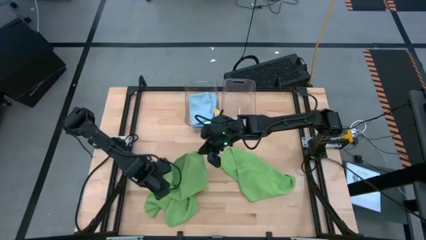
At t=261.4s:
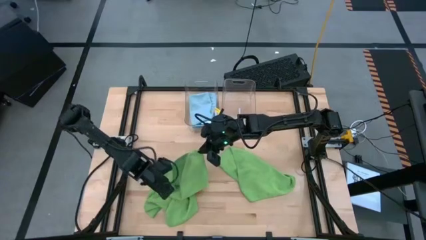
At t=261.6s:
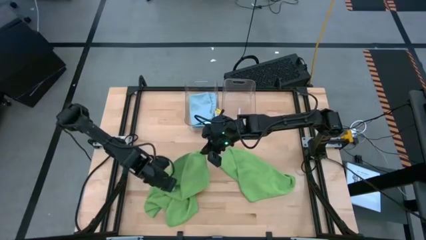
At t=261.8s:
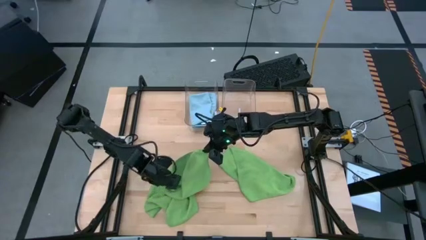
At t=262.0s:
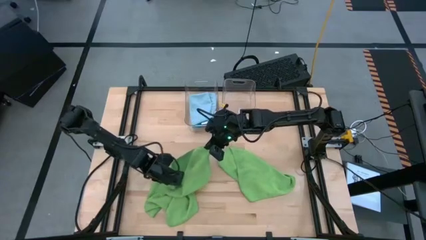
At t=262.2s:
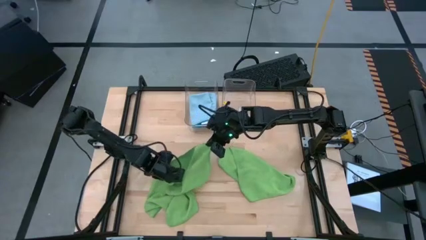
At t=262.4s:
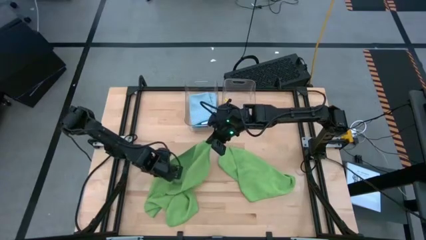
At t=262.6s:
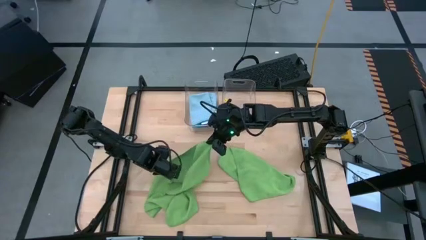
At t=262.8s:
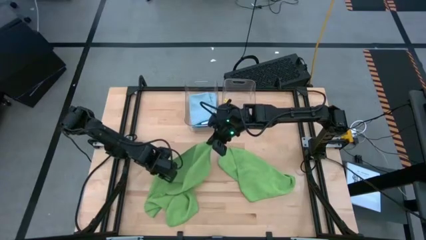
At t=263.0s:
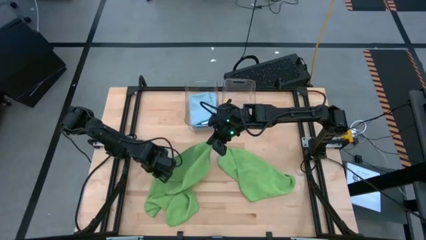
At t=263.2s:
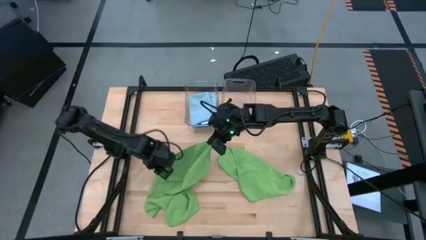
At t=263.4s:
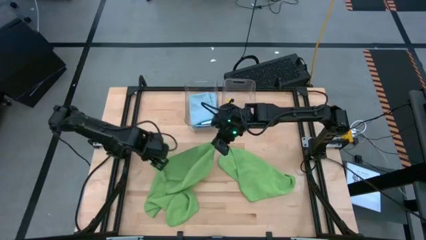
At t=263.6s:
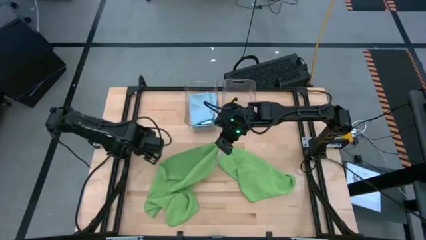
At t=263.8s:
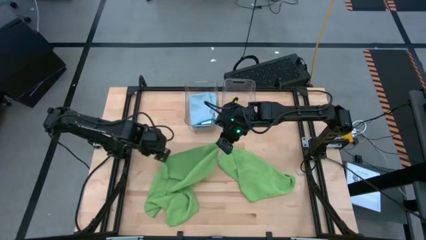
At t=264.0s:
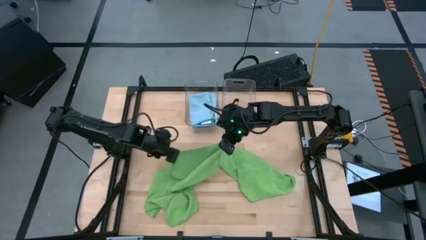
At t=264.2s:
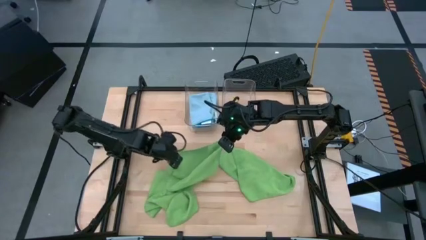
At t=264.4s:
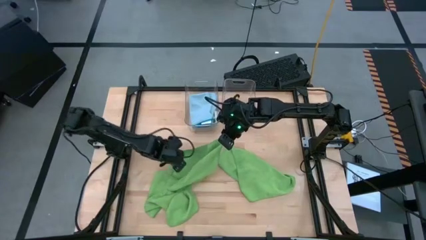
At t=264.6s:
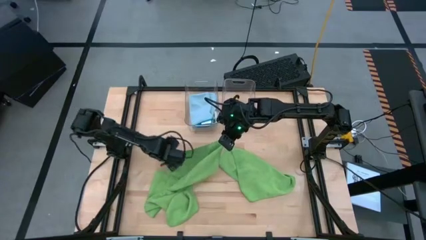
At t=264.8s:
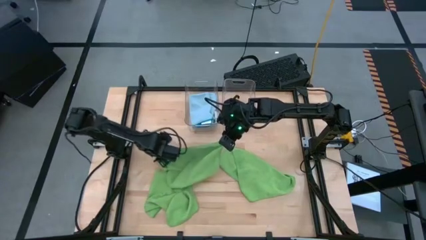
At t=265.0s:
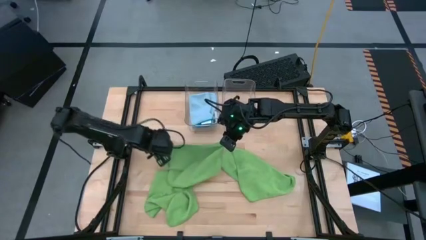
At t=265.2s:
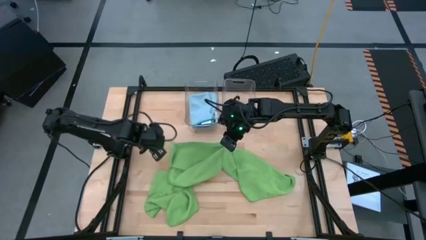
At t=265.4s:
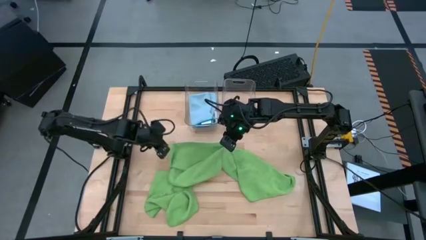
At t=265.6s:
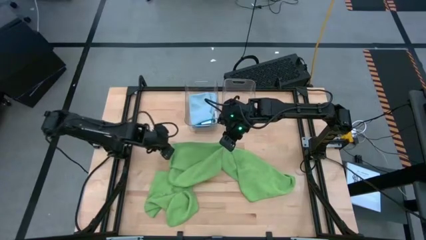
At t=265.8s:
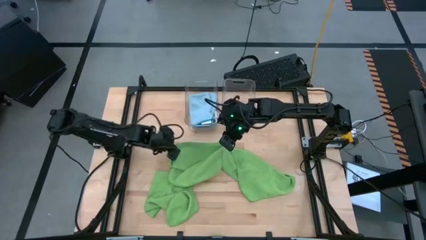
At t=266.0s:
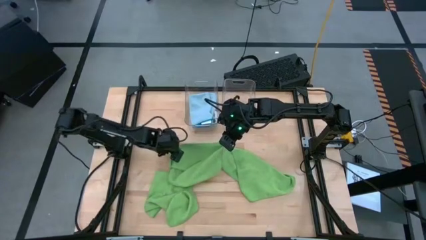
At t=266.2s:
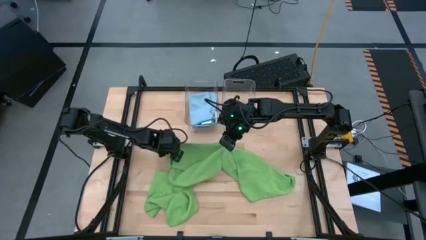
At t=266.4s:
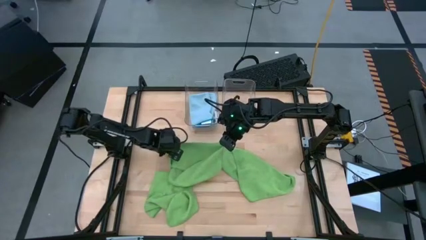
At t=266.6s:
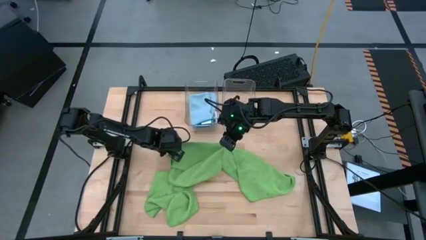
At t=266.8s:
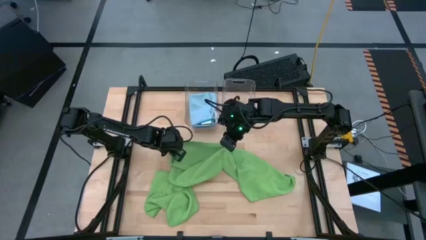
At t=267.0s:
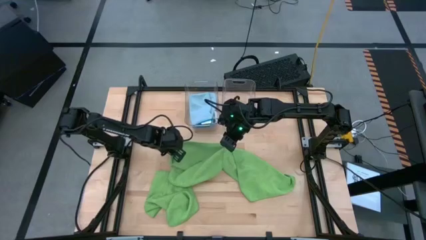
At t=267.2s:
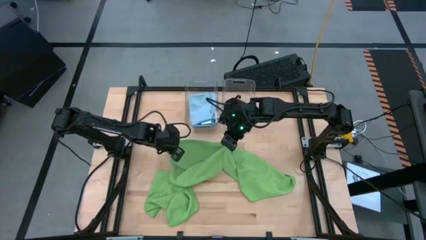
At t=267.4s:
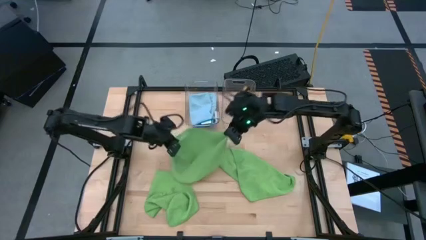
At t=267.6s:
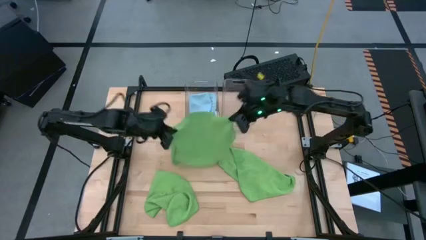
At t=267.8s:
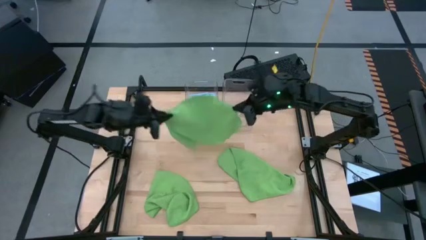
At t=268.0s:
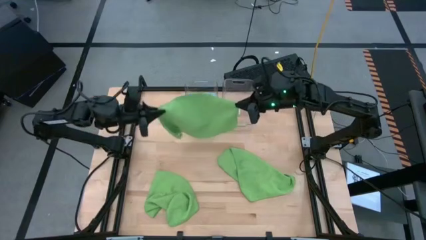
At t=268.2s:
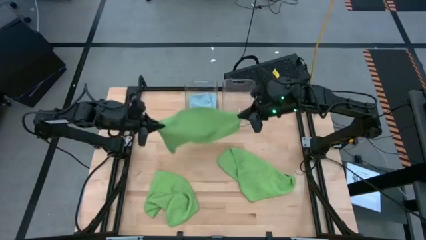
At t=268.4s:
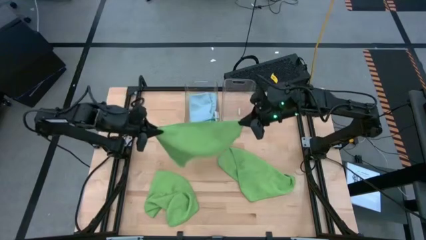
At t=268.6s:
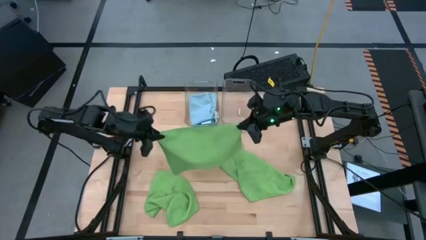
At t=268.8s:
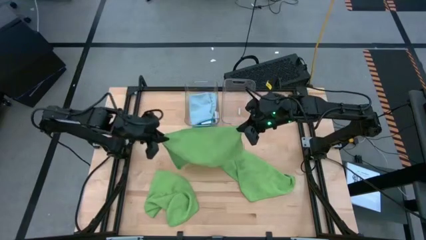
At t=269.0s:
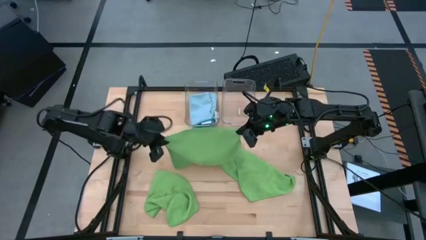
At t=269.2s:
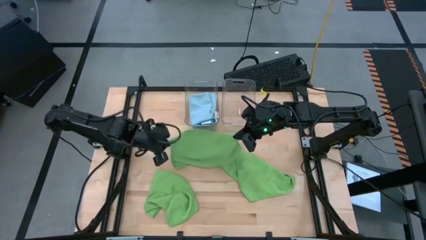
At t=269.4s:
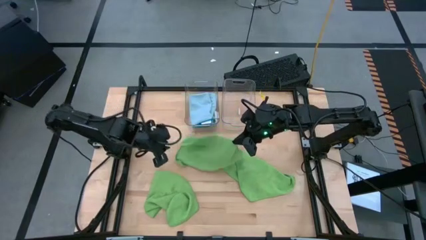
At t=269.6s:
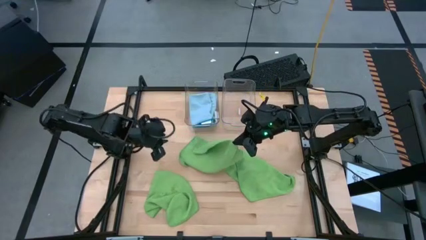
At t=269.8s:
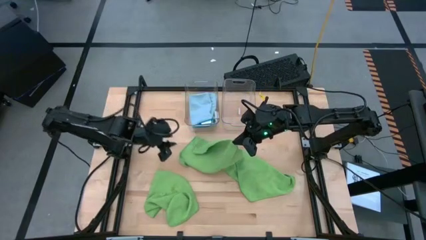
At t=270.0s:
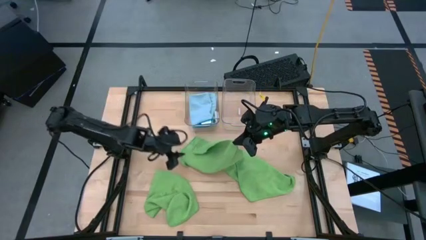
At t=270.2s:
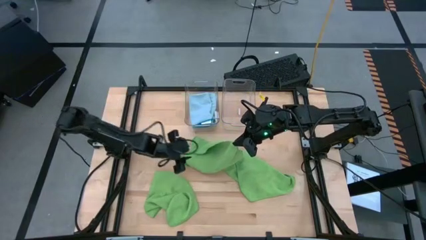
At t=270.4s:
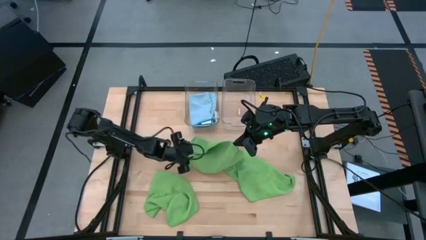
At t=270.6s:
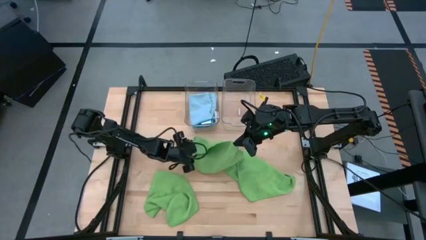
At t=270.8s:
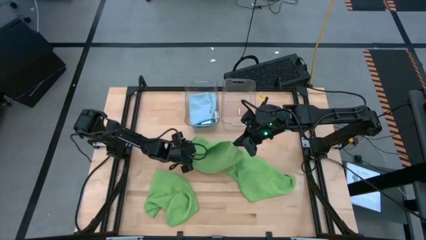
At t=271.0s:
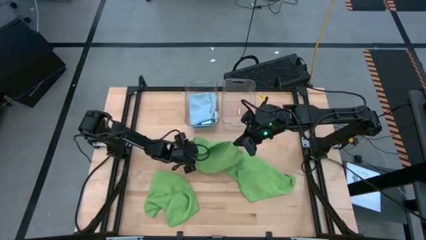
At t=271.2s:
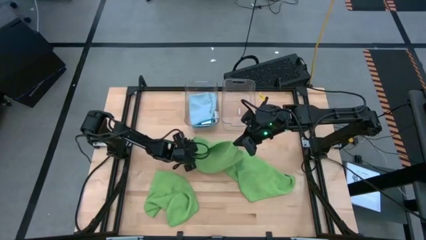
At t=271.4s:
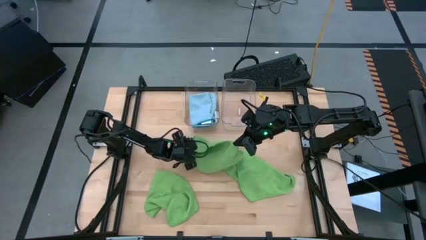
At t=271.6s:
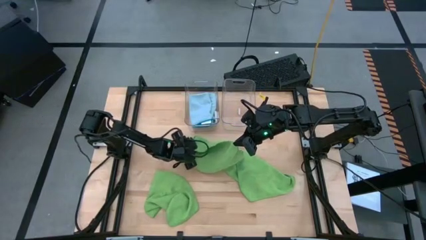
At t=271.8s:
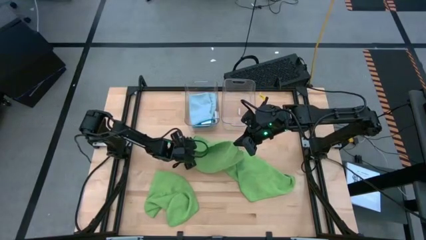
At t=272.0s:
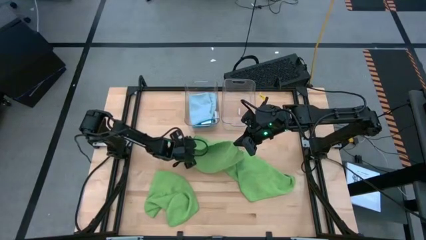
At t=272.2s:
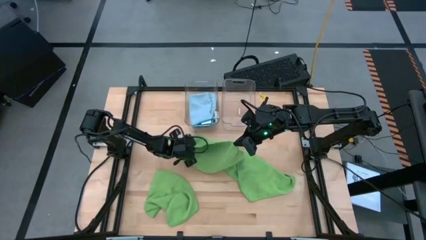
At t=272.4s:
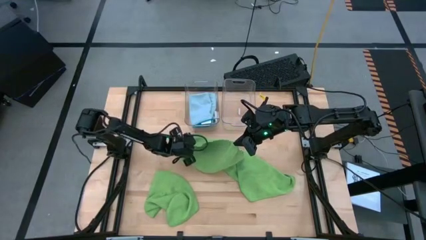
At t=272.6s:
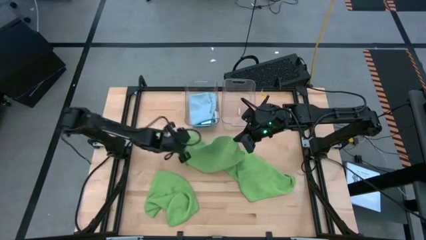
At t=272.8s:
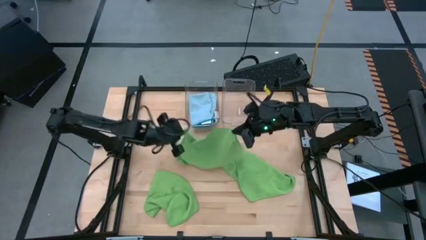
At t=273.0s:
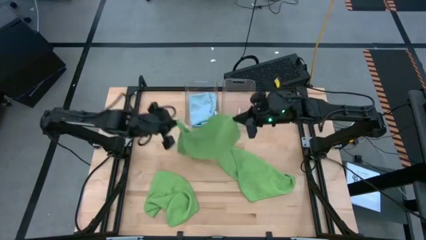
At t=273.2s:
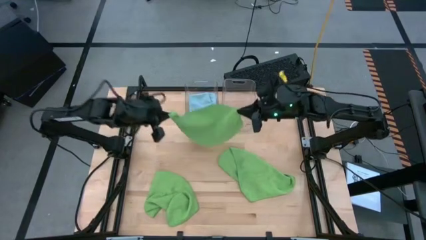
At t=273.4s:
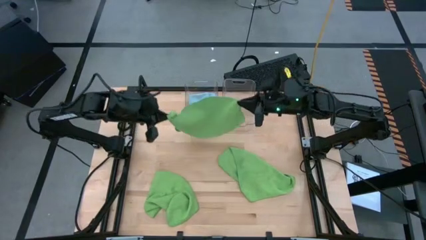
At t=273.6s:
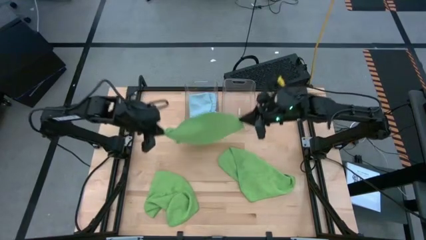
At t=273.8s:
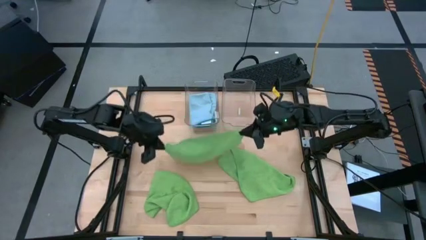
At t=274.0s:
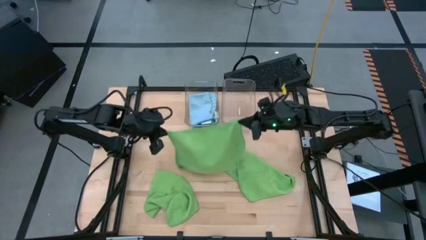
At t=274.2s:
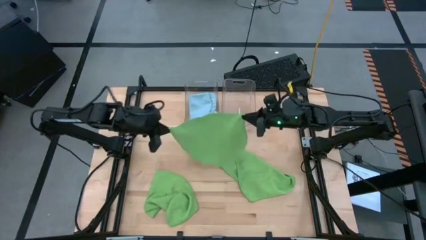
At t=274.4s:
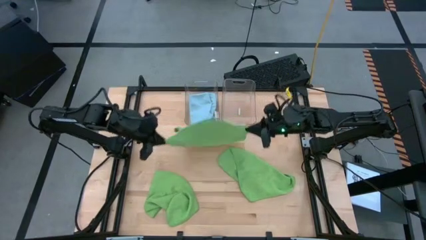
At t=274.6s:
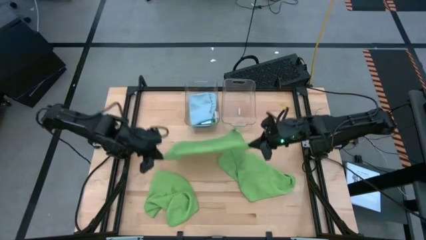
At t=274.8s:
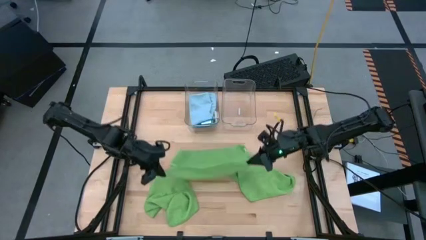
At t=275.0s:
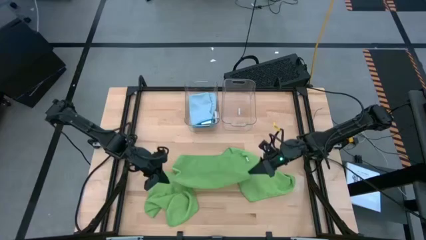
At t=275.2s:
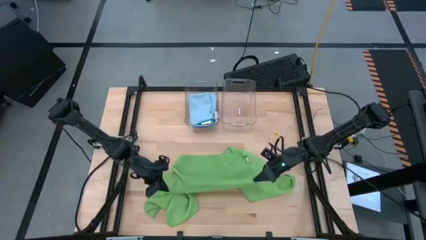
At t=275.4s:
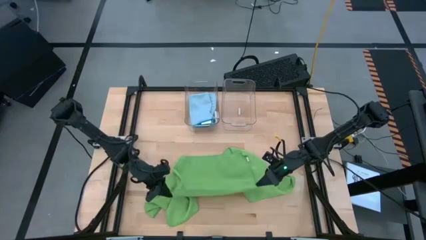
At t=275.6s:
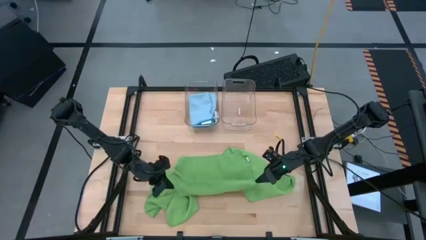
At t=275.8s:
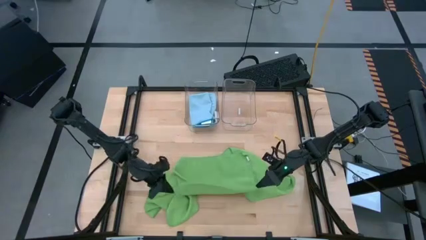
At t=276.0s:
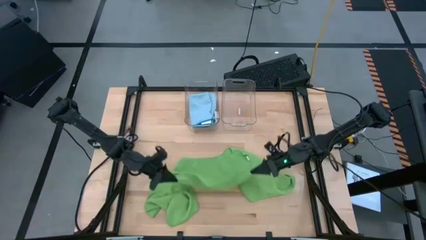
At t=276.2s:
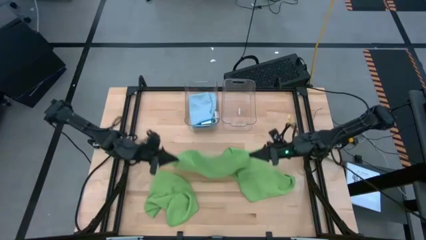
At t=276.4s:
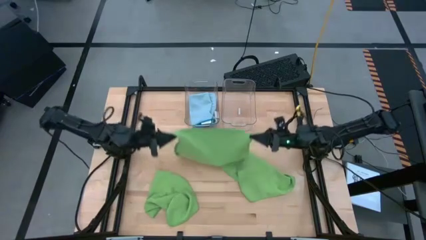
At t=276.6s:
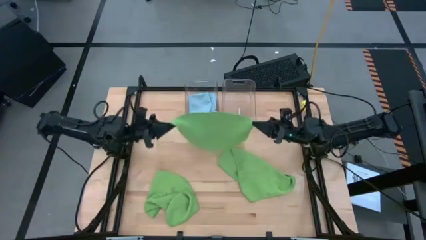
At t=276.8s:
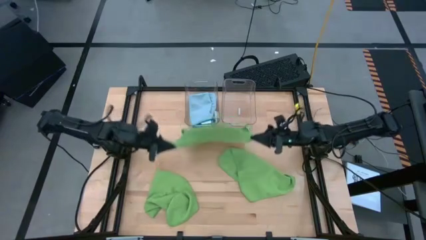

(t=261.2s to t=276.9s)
Task: Fold microfiber towels
Fold the top left green microfiber towel
